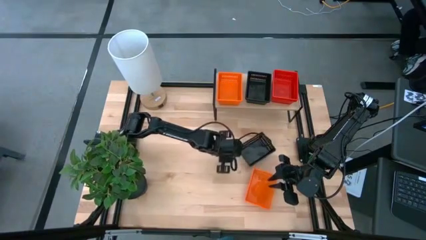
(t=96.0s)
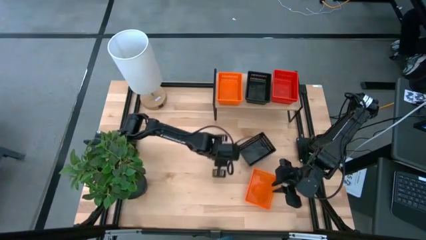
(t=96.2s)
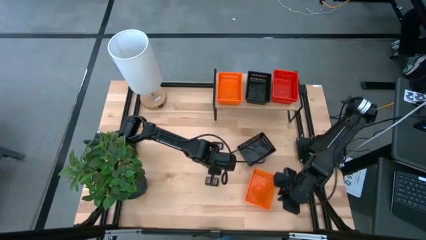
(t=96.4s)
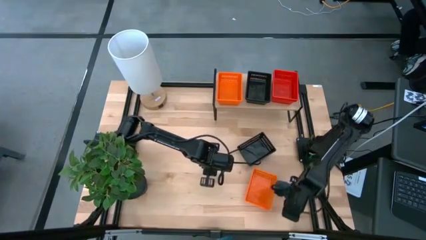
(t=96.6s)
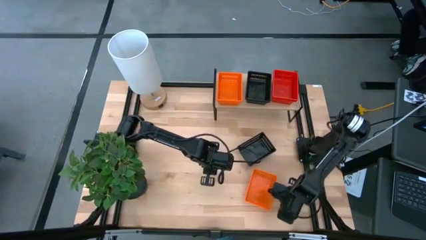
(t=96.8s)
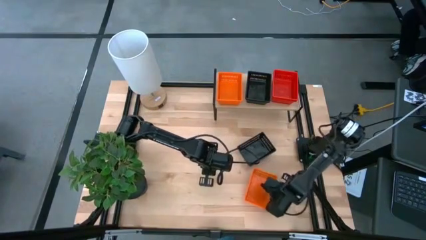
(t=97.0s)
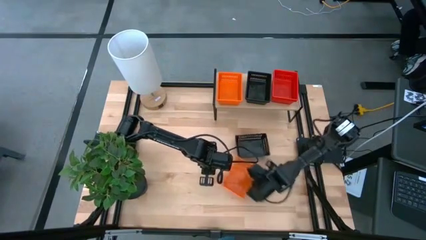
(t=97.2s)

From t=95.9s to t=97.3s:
Task: Stack baskets on shelf by color
Adjust the orange bin on the table

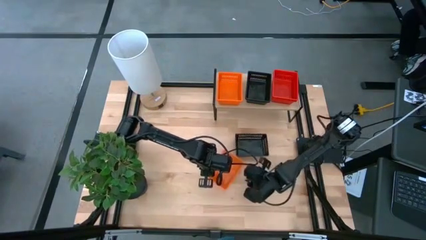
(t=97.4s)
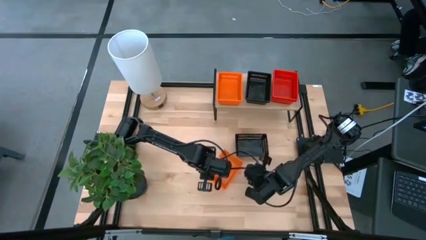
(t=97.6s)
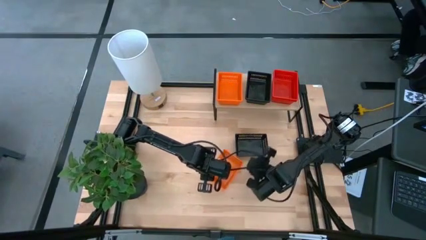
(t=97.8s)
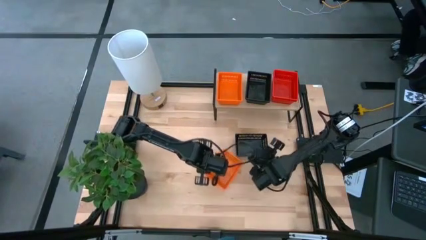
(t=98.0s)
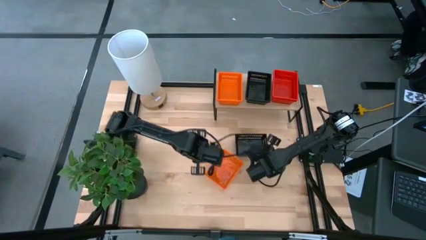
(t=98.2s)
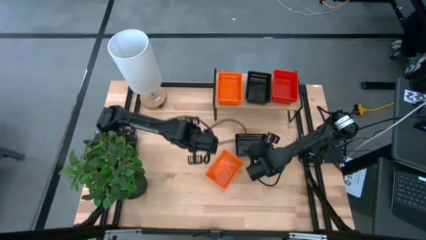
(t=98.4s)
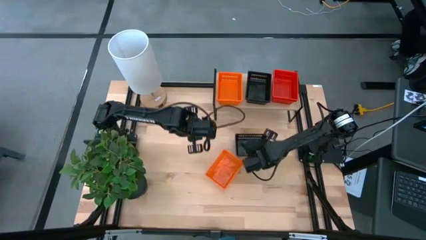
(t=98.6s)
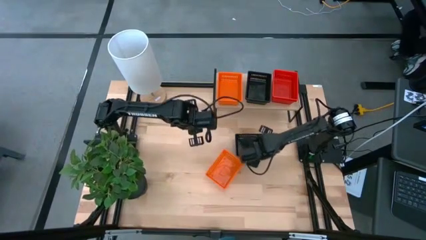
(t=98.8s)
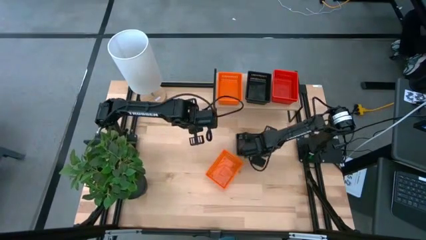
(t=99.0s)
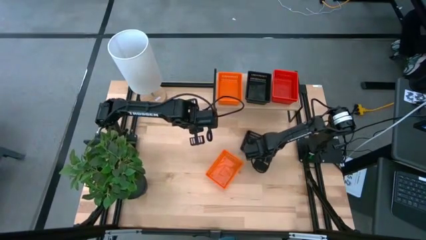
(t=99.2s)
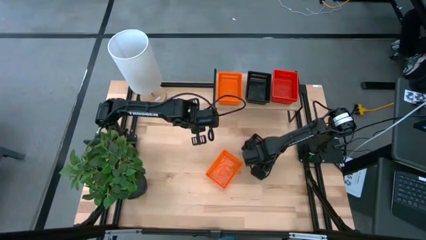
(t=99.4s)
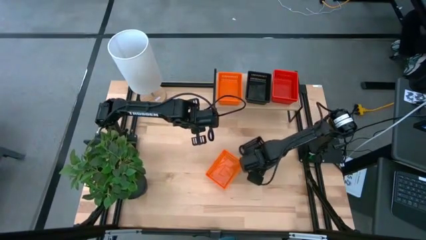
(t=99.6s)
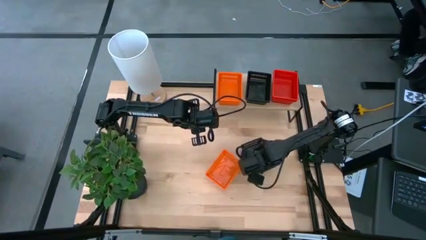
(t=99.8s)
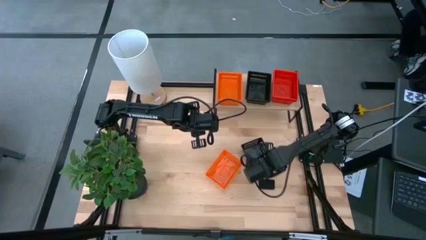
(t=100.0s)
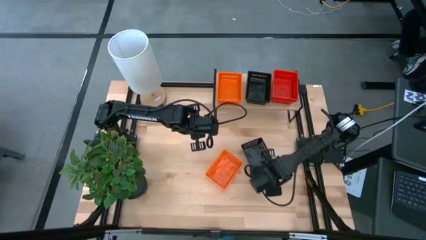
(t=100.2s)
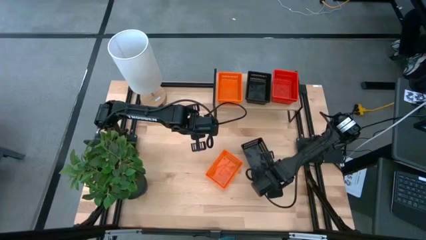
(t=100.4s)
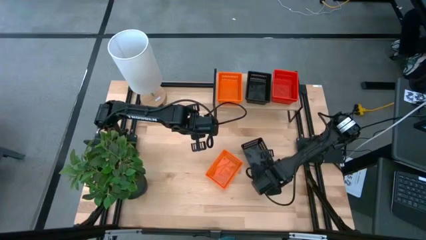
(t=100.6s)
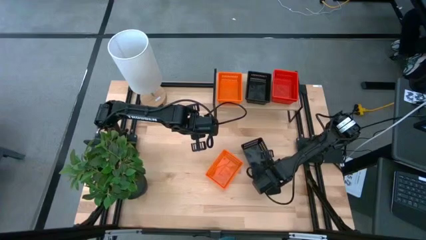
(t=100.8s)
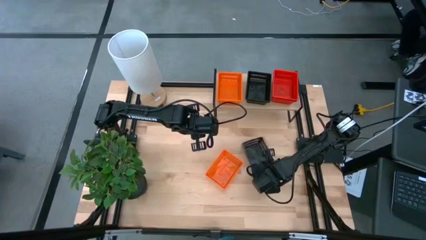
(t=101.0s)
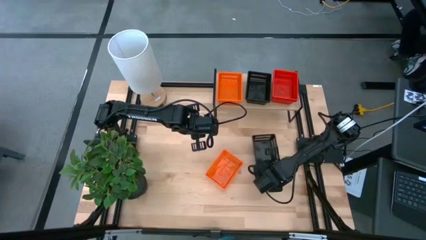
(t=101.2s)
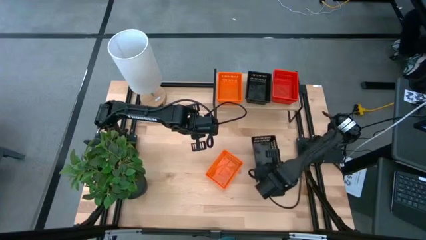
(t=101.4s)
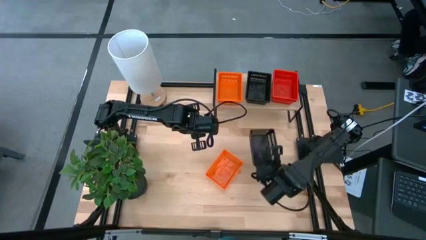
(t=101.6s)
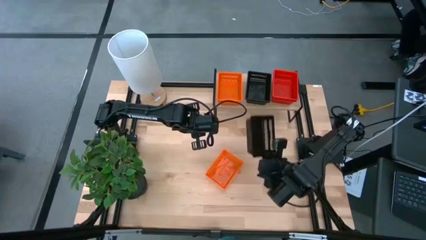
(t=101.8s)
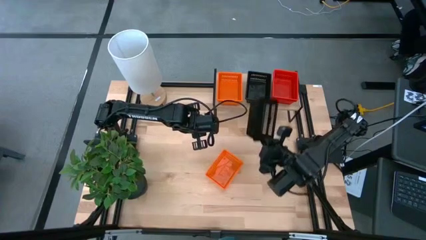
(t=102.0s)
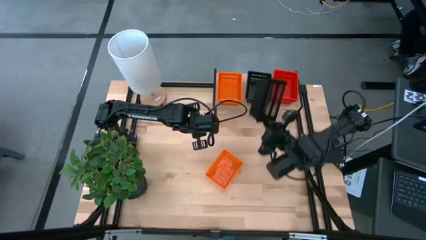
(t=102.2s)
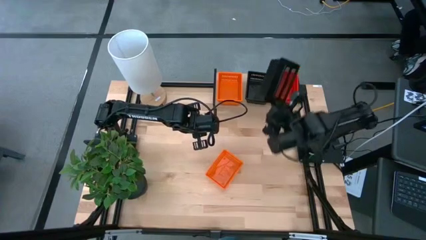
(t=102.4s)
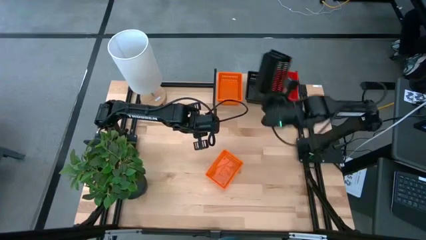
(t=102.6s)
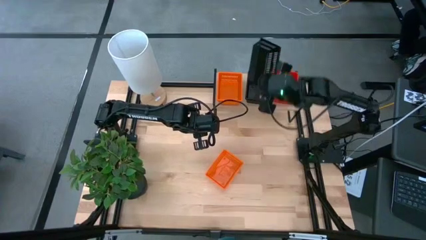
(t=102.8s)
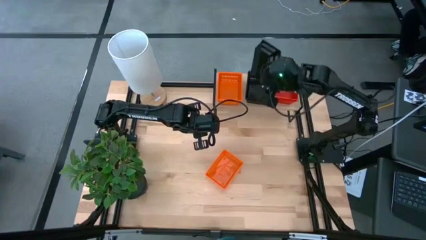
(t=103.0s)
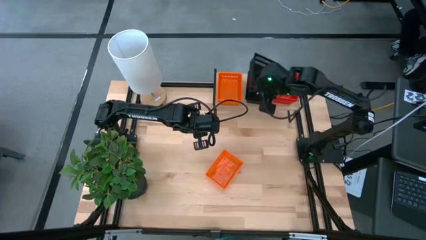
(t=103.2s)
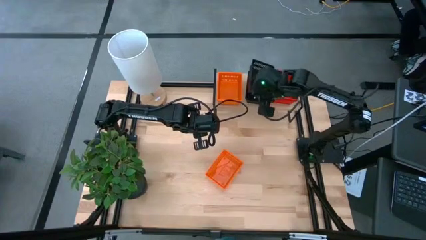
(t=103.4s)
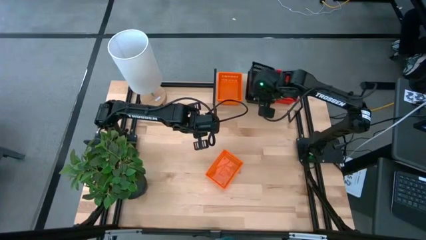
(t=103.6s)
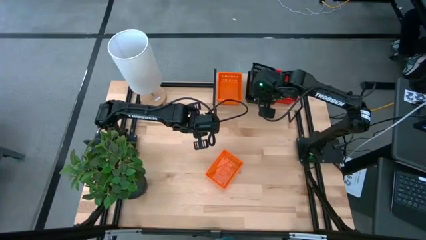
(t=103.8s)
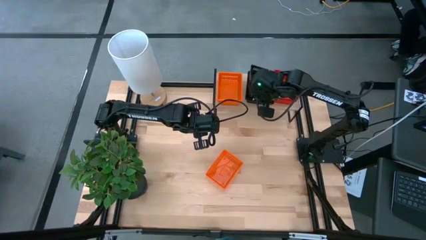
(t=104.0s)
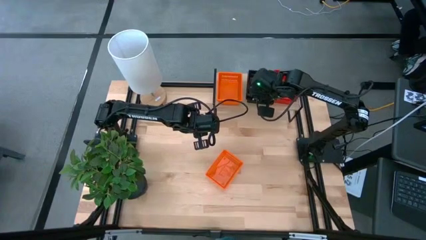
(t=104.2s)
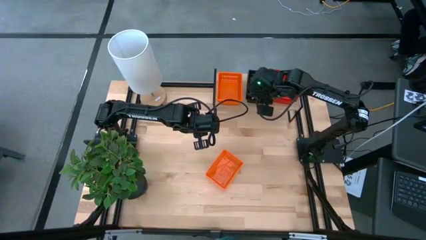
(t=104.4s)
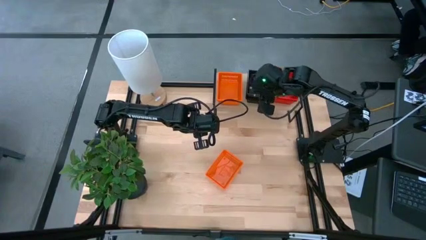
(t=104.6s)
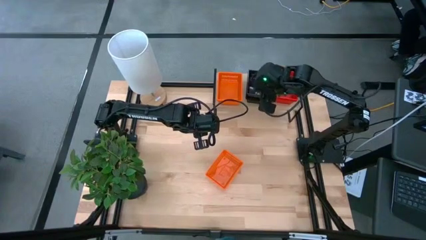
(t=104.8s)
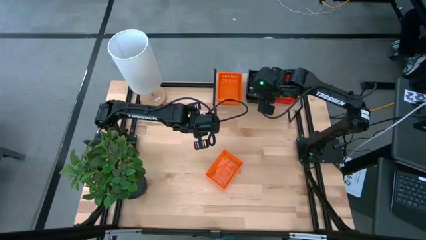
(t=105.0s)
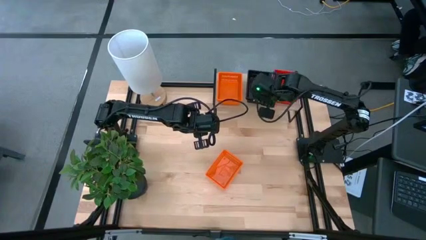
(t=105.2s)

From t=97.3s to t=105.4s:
Stack the black bin on the black bin on the shelf

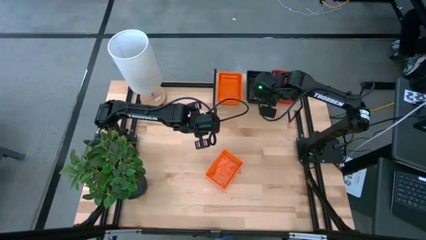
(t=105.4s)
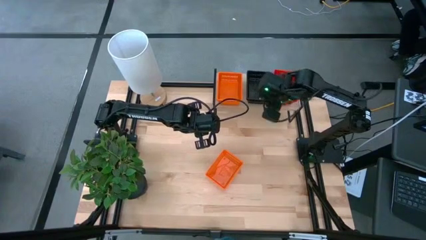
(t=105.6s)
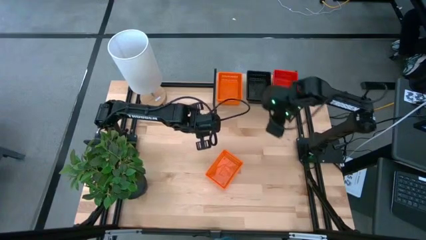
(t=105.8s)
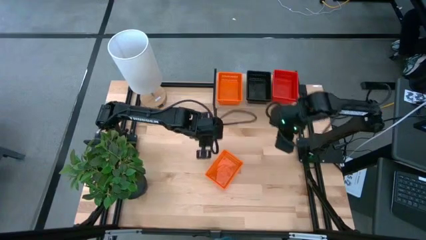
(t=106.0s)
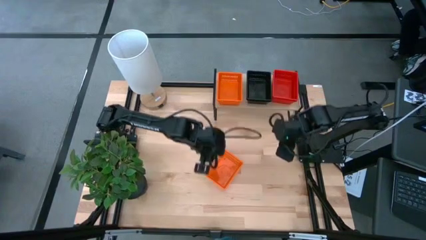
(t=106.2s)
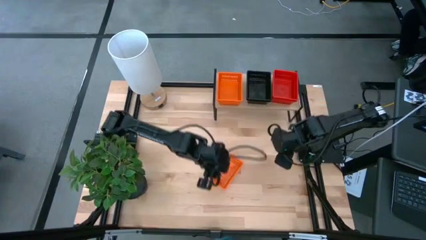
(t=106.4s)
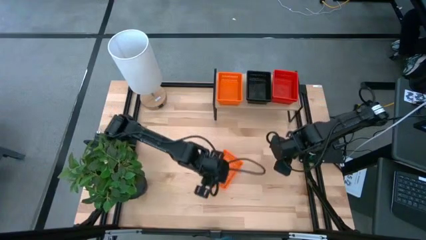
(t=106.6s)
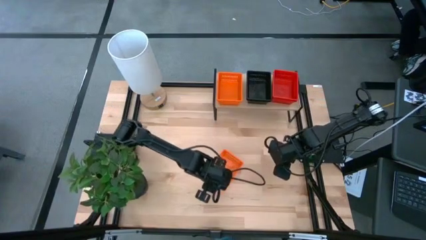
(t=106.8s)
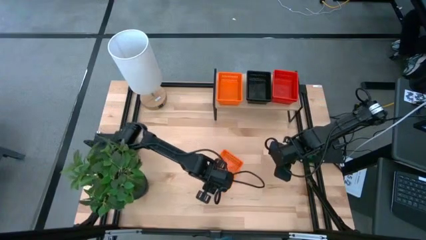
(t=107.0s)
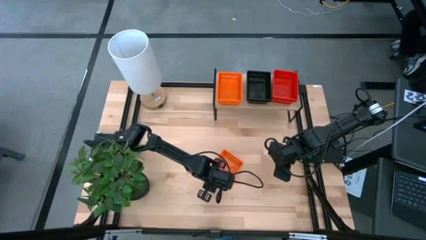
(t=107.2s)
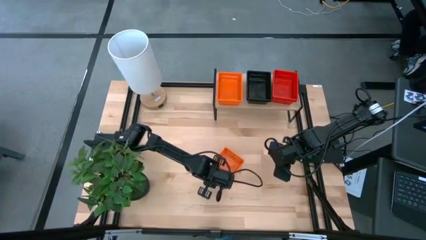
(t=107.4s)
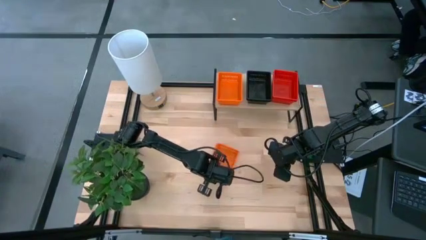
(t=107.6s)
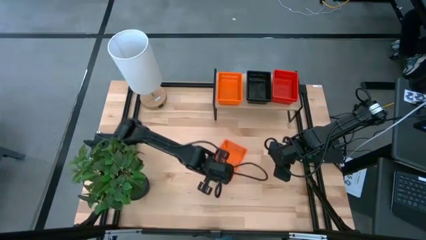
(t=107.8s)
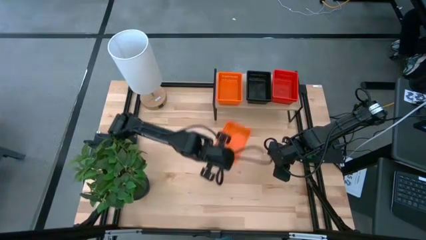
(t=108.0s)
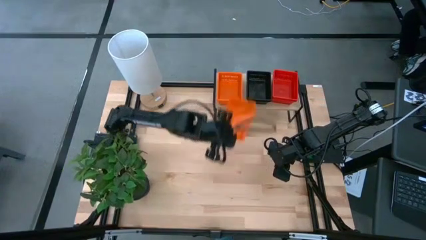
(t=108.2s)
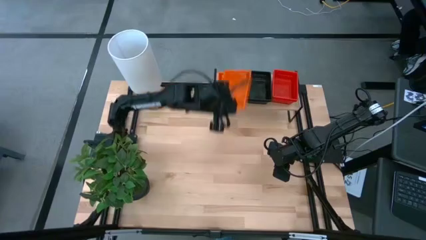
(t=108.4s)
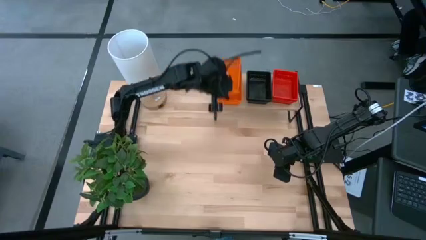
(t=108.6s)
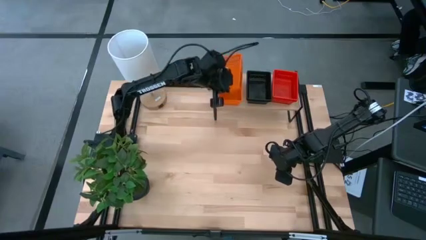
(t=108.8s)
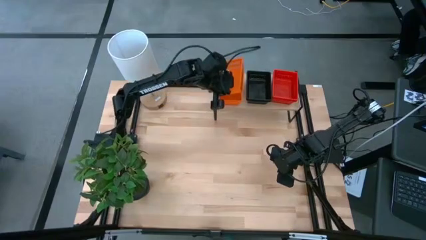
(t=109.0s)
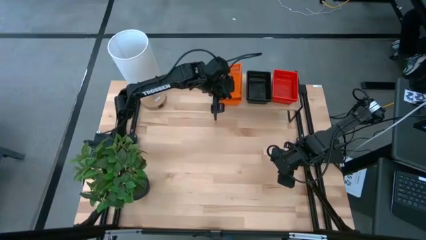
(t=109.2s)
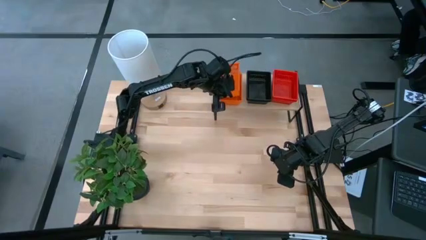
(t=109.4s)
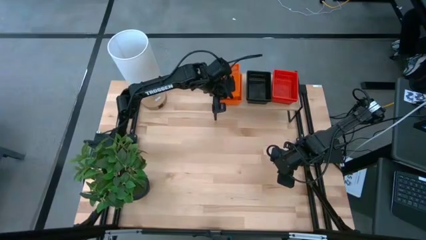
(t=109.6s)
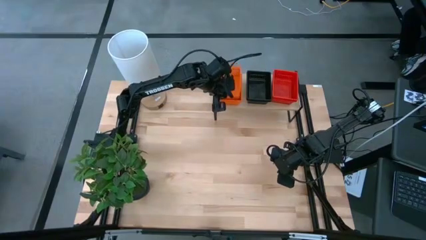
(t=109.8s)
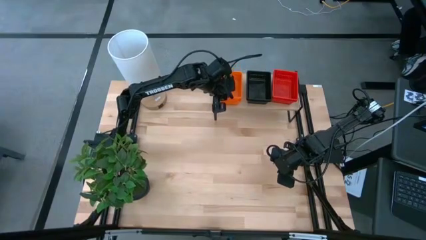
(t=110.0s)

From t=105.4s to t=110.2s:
Stack the orange bin on the orange bin on the shelf

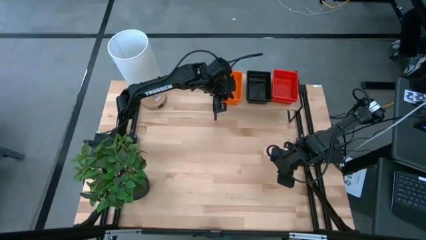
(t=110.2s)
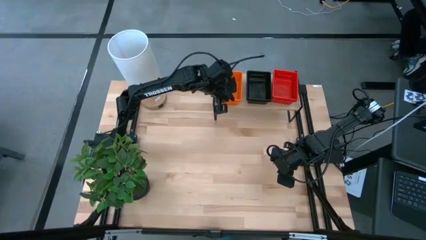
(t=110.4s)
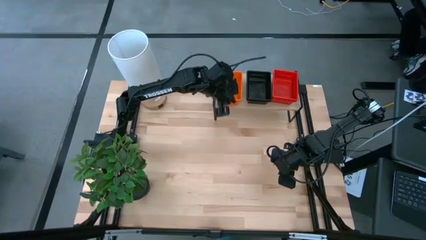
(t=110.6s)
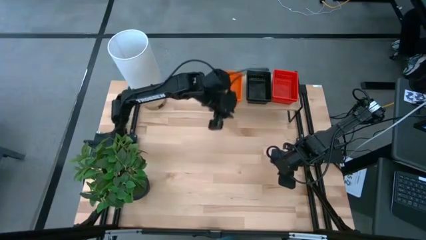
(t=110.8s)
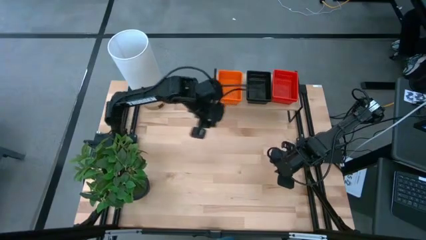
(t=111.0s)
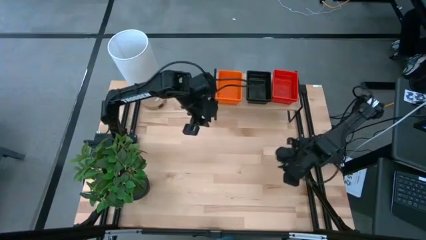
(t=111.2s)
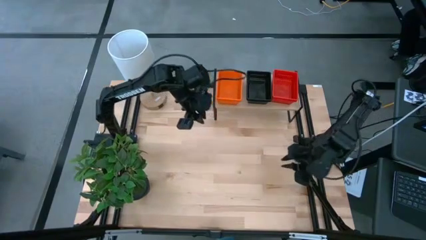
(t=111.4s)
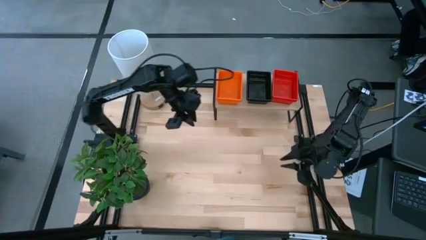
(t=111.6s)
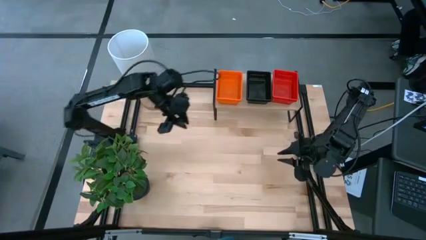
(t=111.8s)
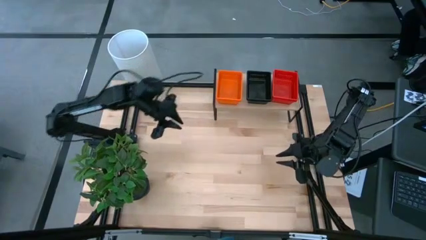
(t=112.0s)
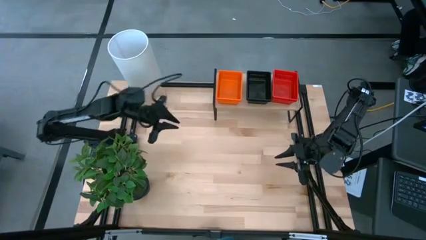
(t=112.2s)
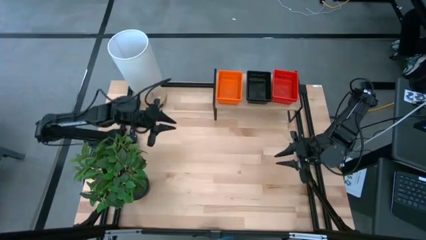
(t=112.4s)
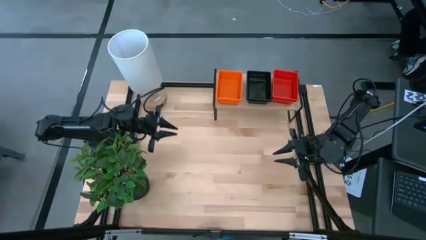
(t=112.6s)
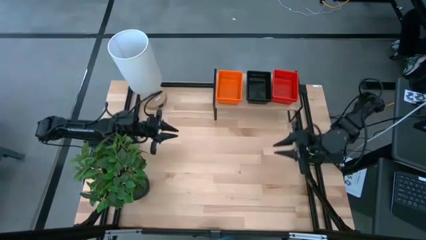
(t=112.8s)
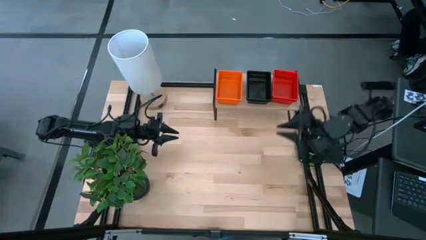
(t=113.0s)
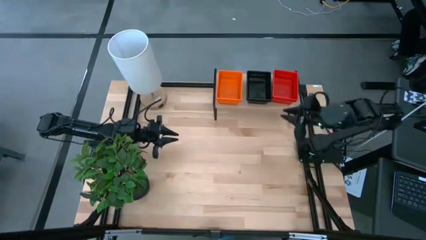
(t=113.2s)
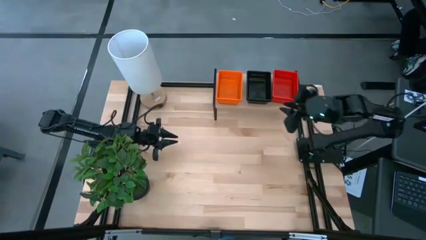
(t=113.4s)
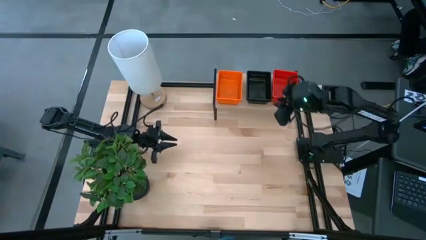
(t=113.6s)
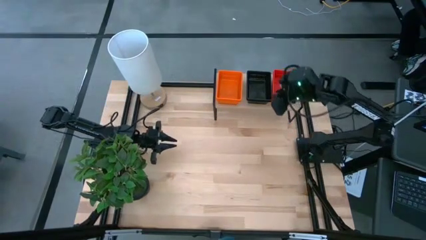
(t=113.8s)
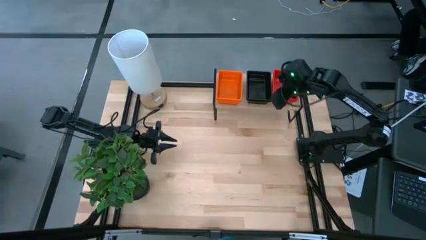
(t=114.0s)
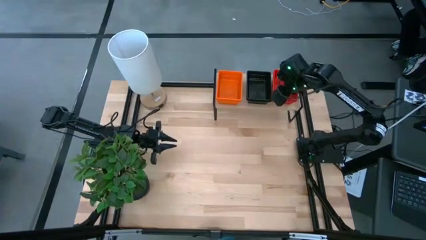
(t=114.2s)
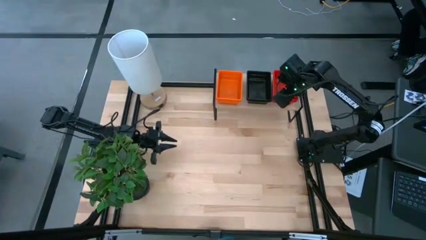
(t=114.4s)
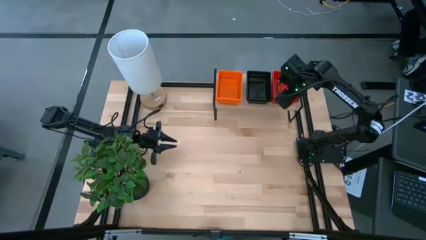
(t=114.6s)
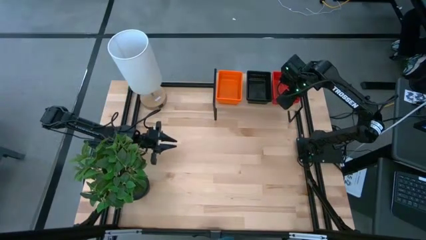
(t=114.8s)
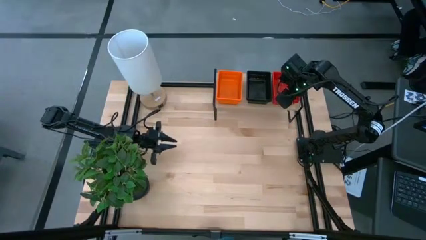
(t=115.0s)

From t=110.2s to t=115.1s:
Adjust the stacked red bins on the shelf
